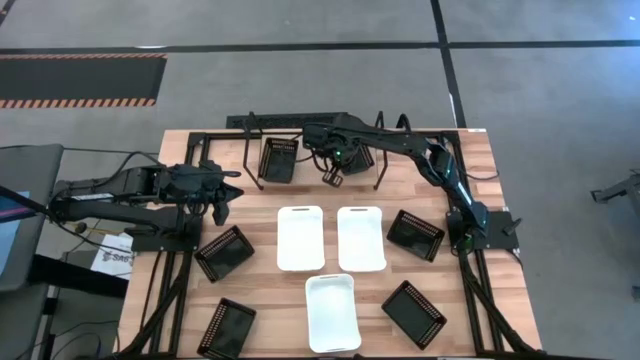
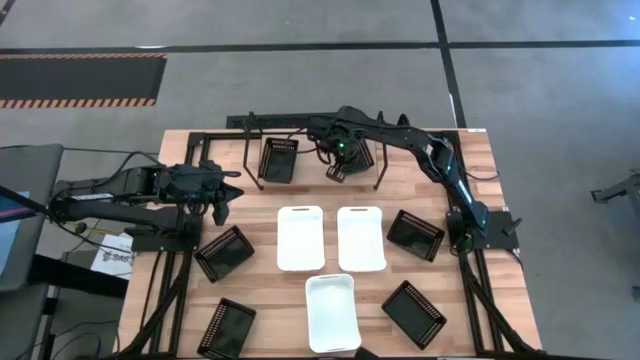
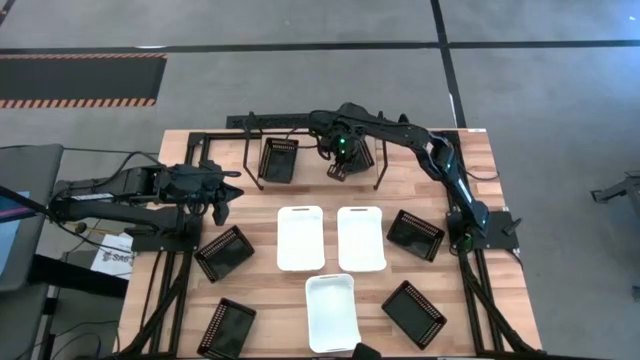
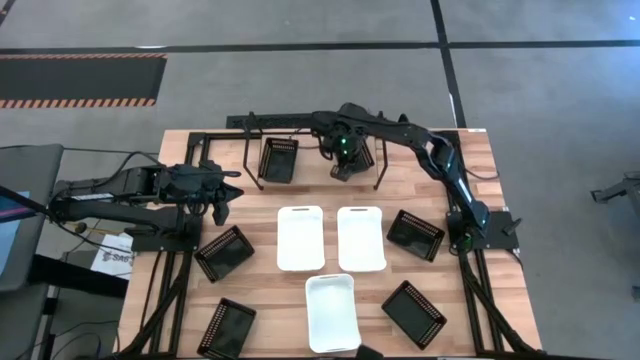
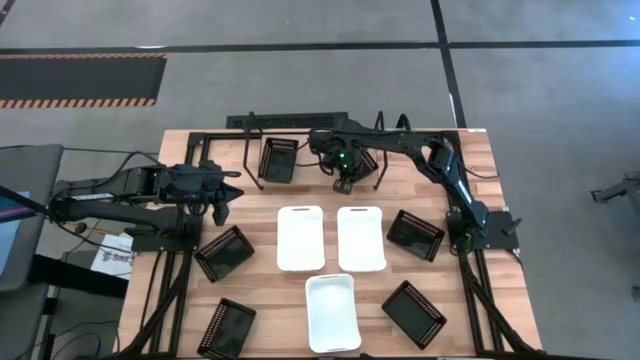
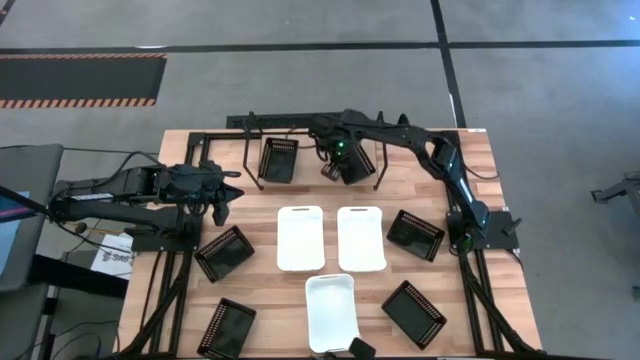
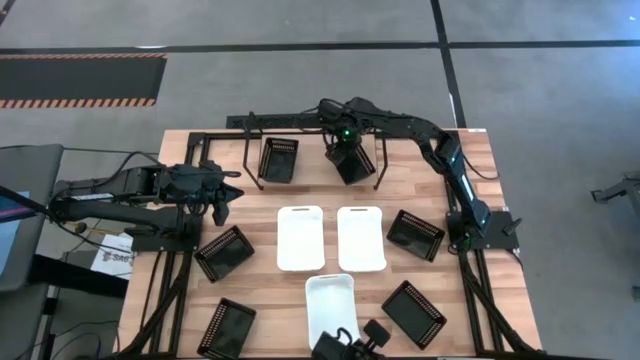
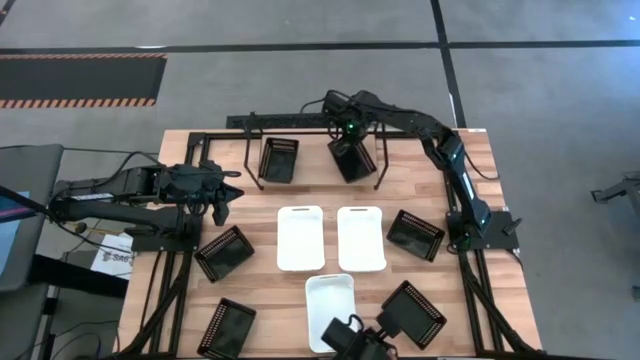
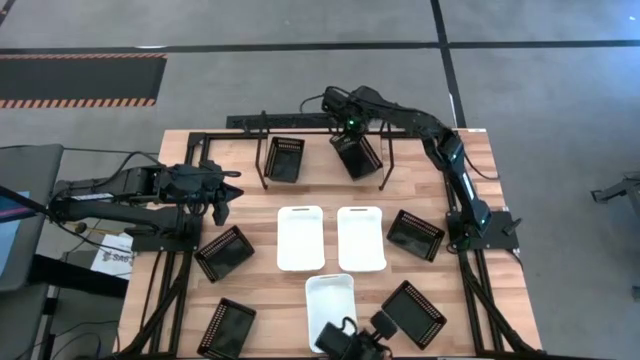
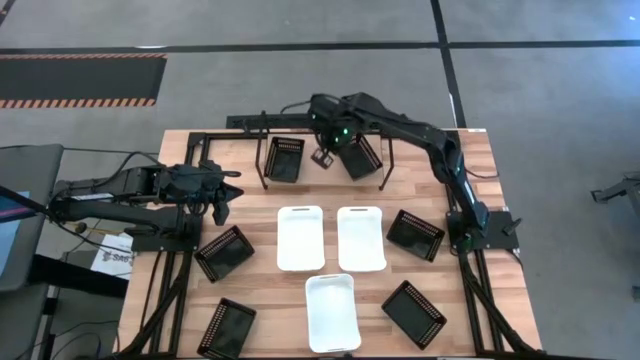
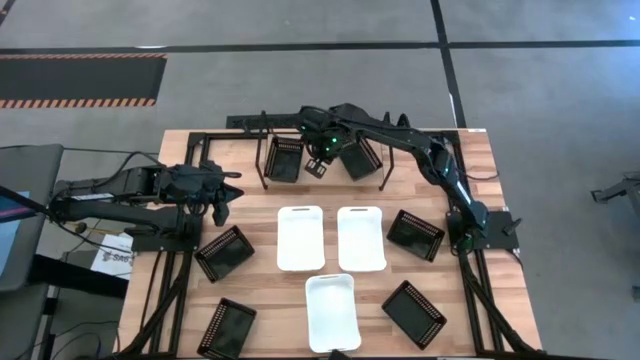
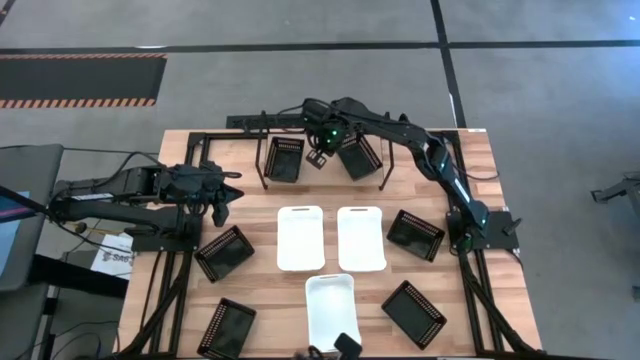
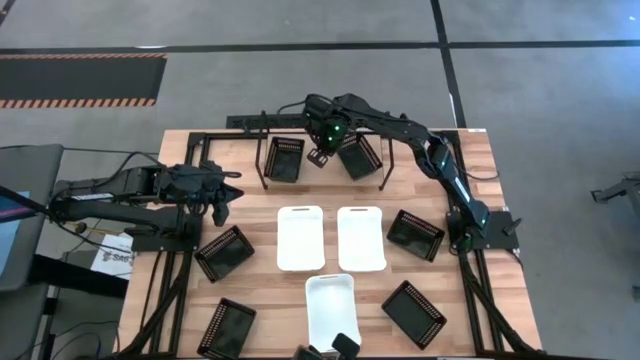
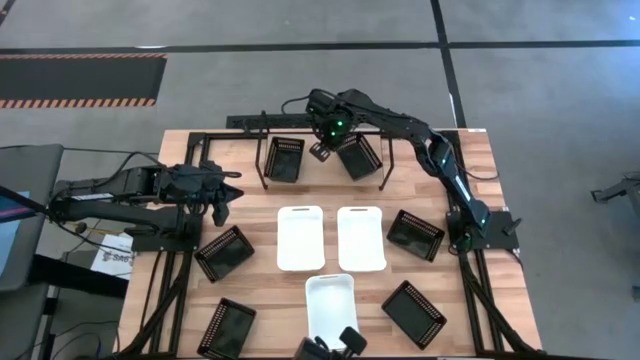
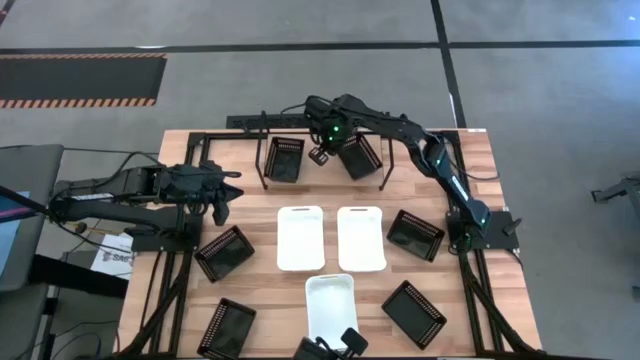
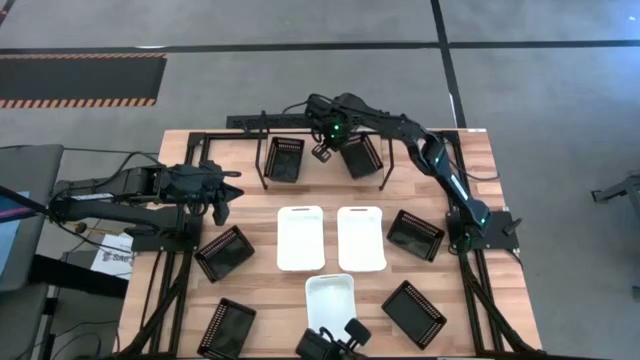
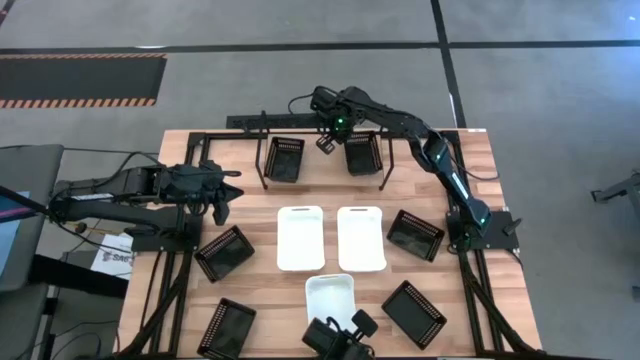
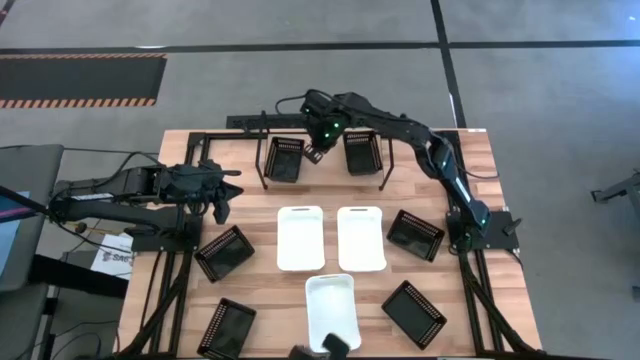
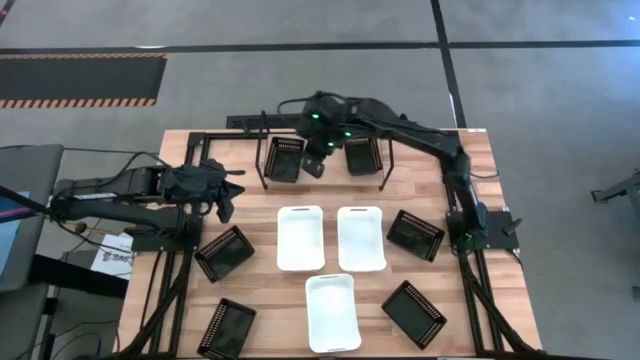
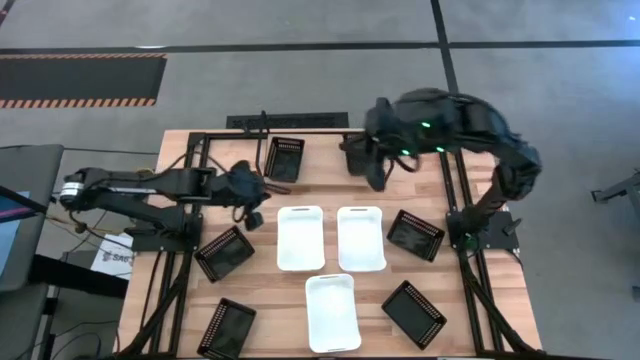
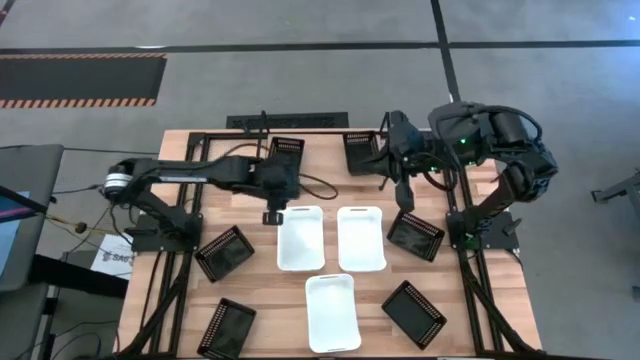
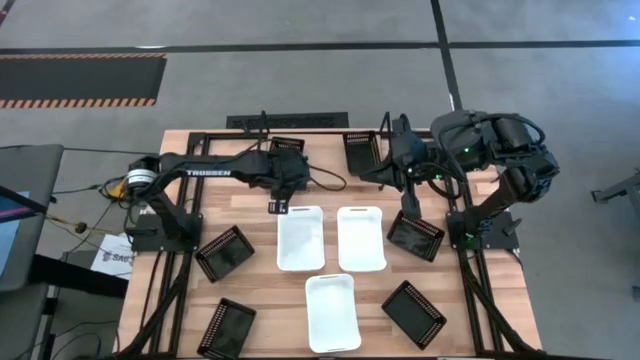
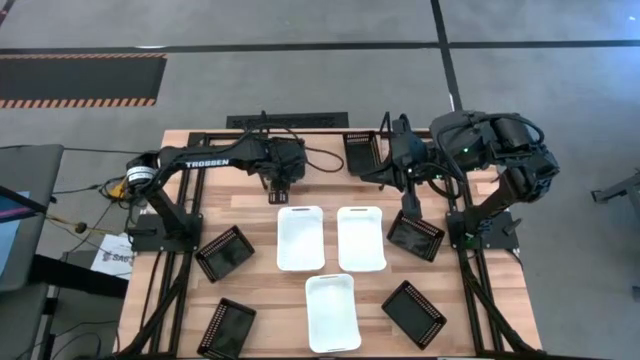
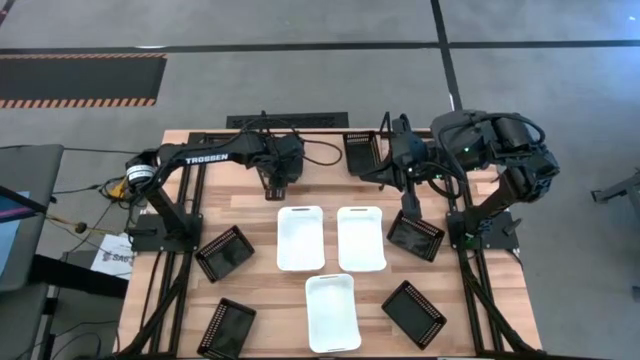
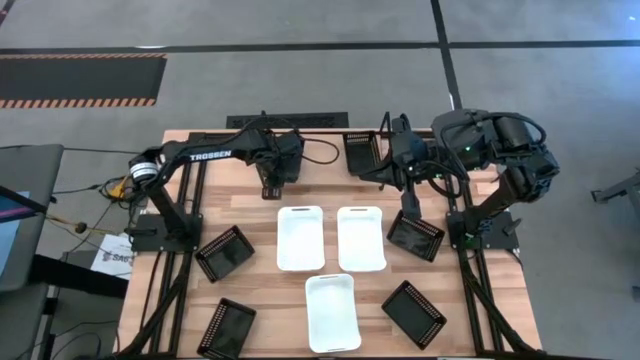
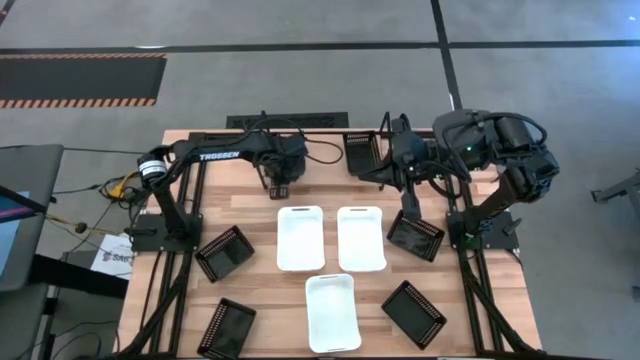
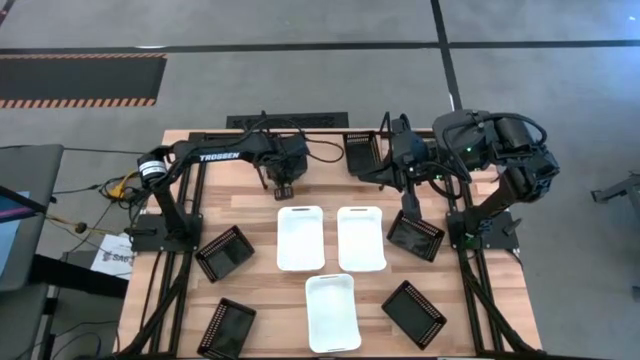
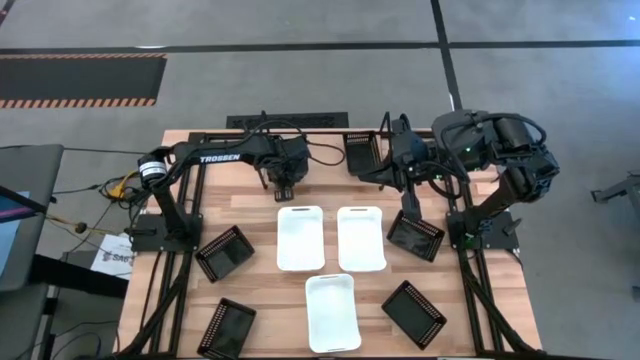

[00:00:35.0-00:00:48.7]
Task: Stack baskets on shelf by color
Adjust the black bins

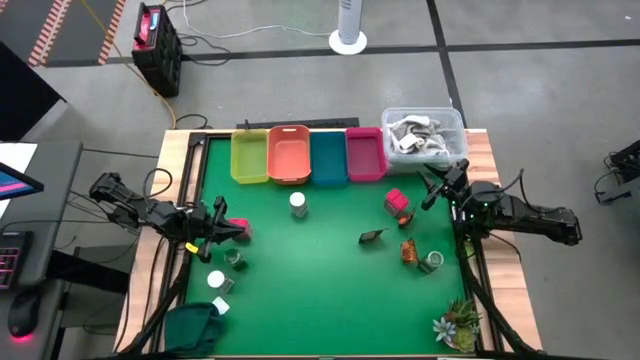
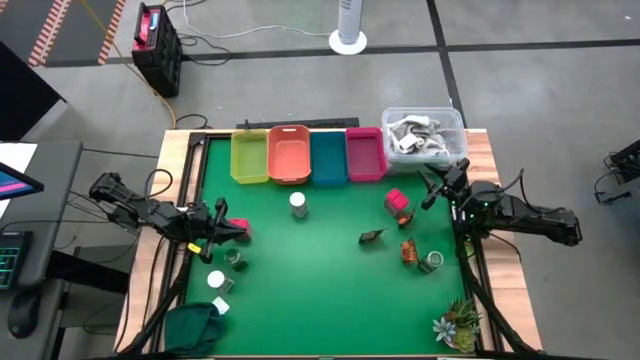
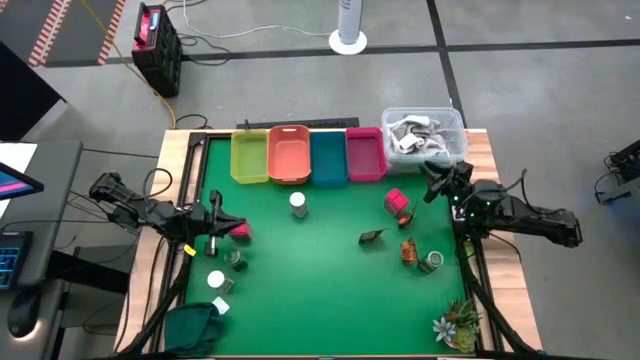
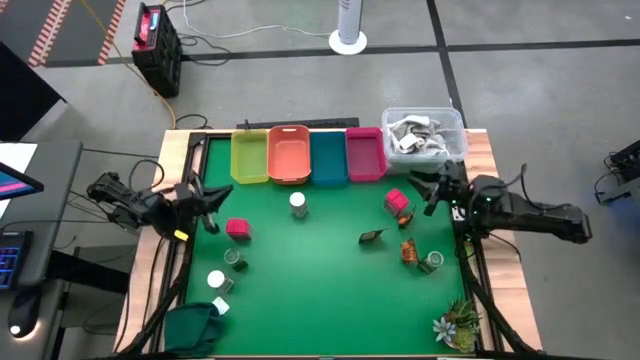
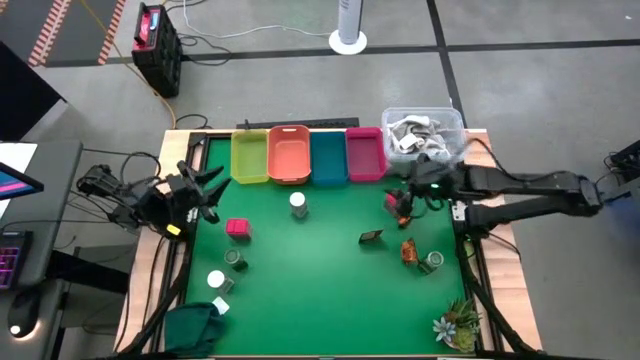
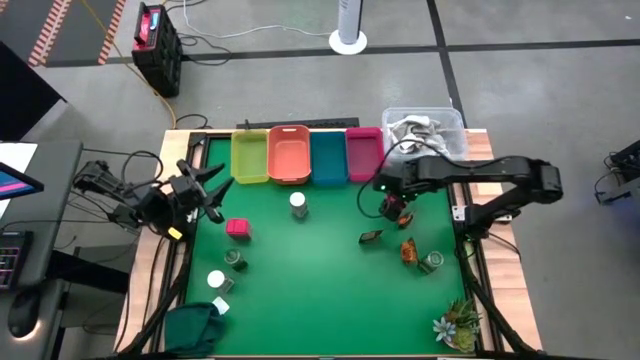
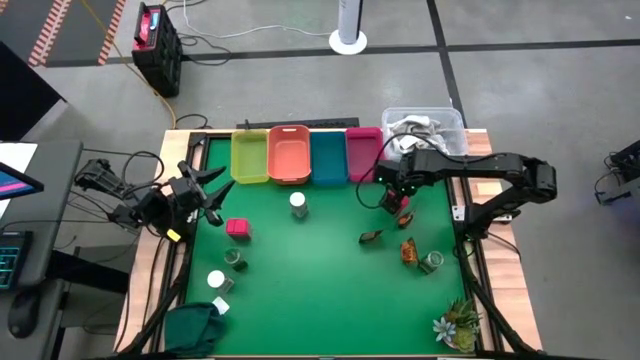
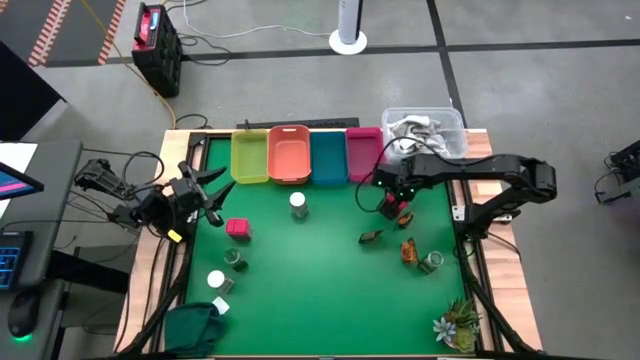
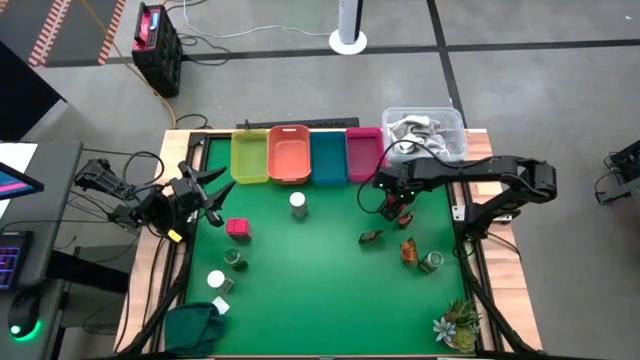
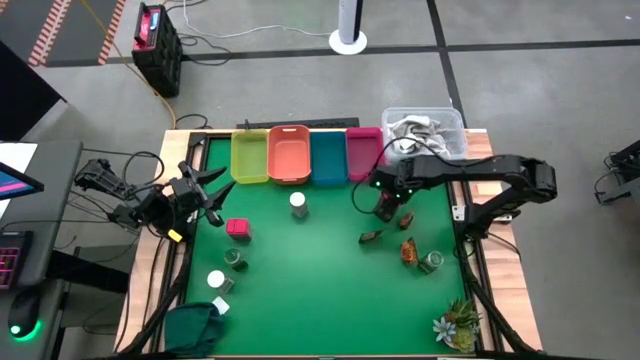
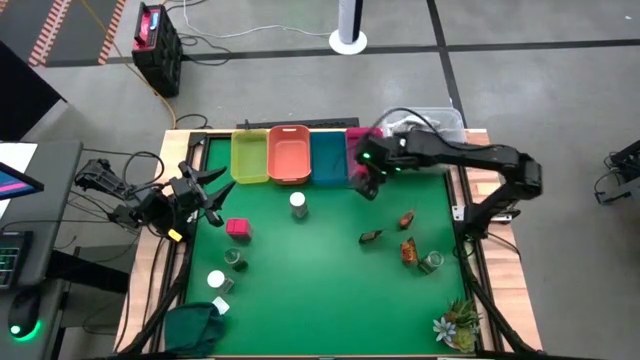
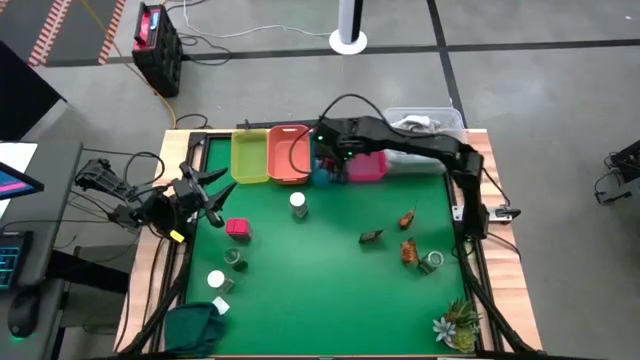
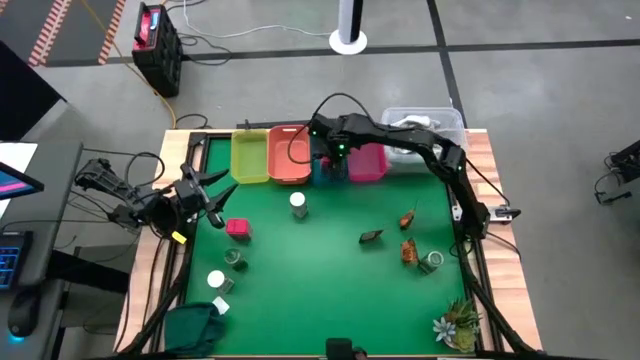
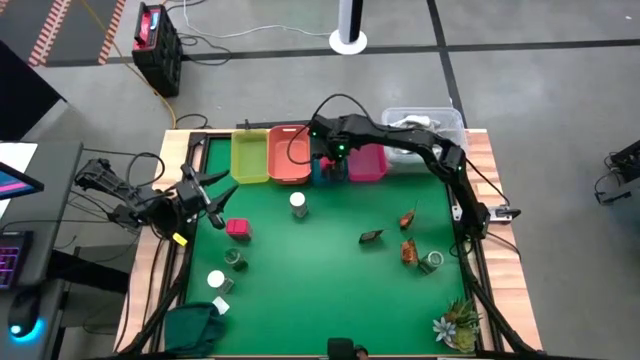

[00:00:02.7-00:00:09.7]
Task: Sort spices by type
Put the right red seasoning can into the blue bin
